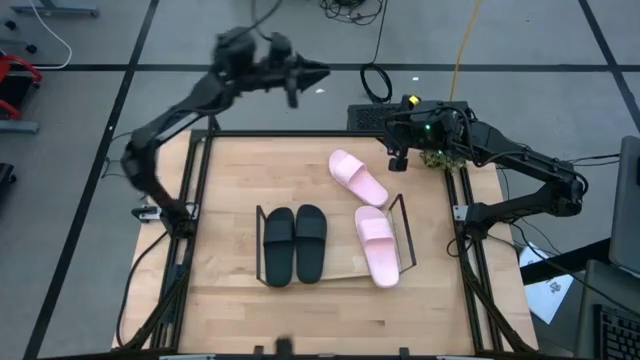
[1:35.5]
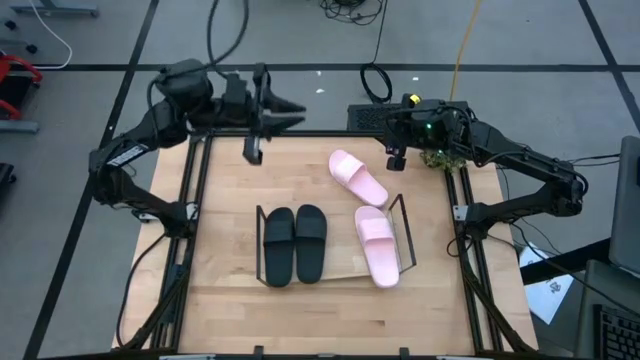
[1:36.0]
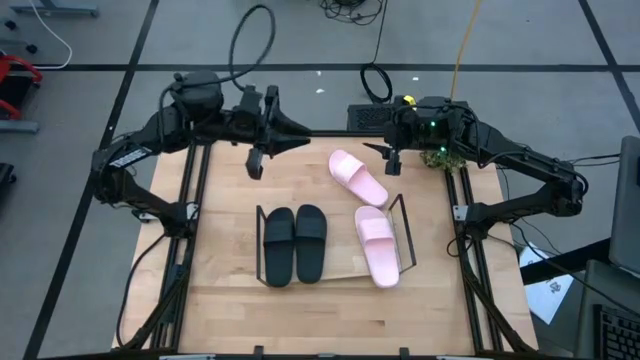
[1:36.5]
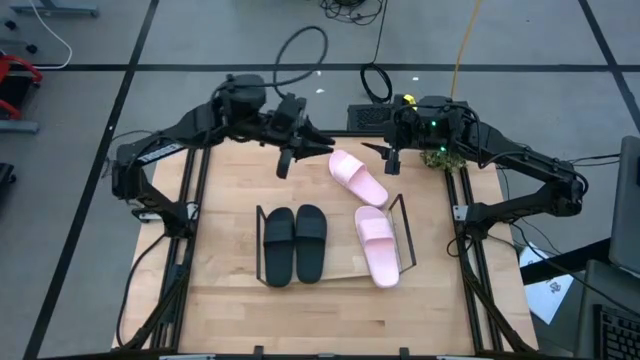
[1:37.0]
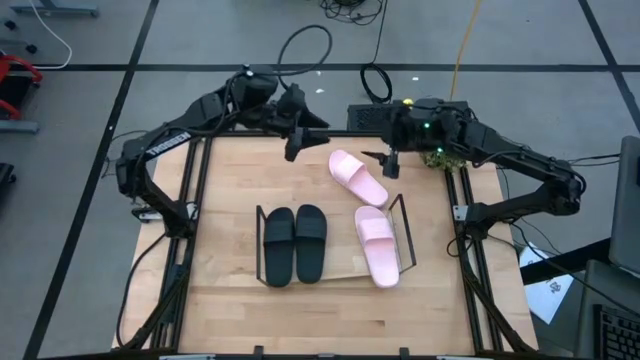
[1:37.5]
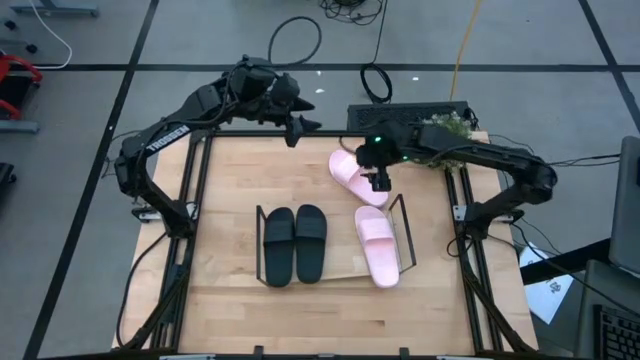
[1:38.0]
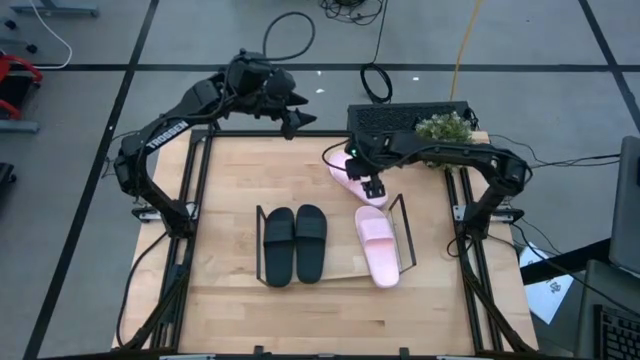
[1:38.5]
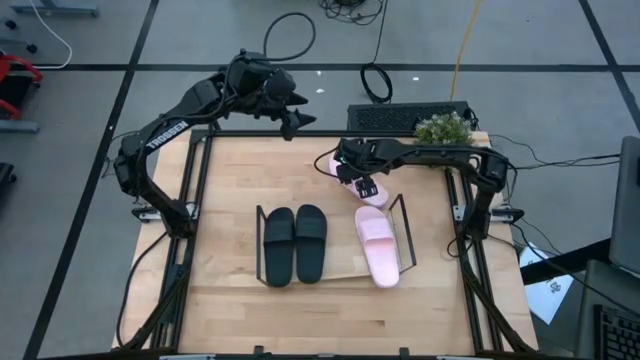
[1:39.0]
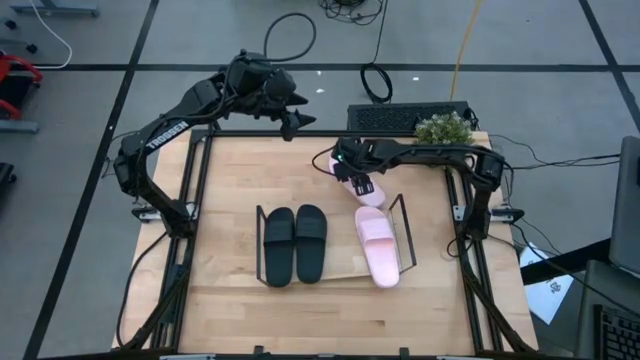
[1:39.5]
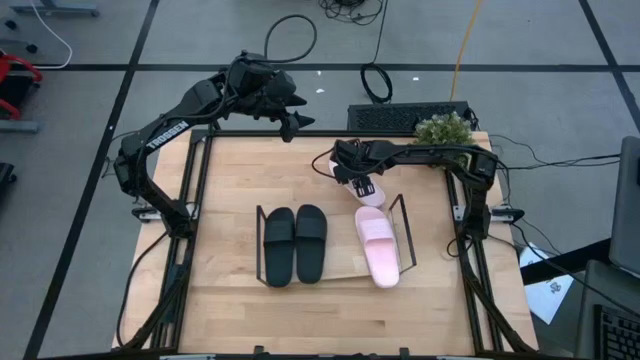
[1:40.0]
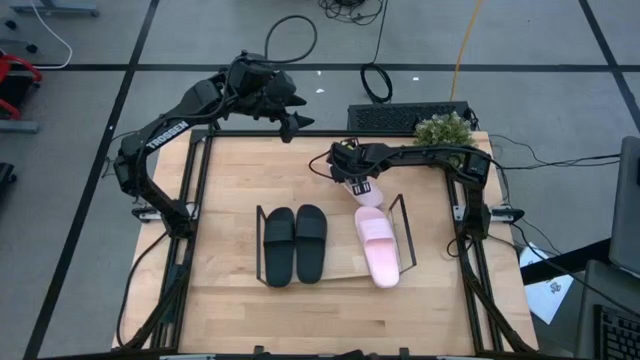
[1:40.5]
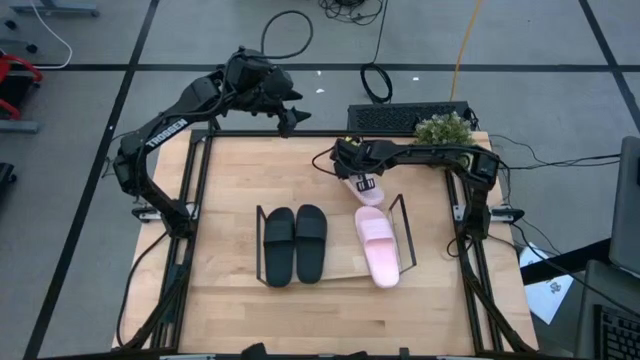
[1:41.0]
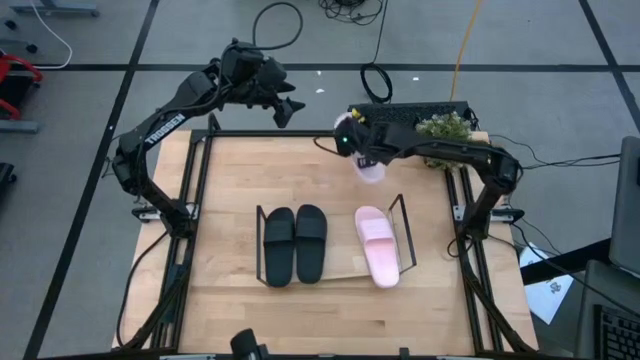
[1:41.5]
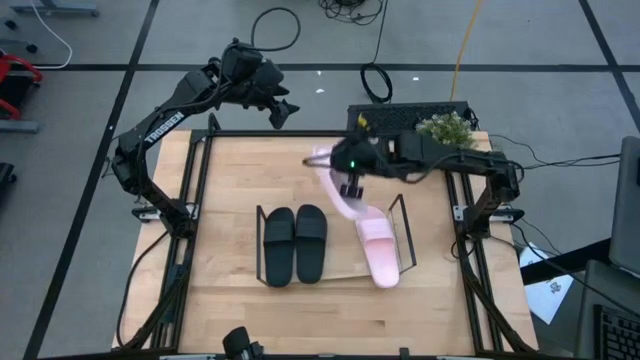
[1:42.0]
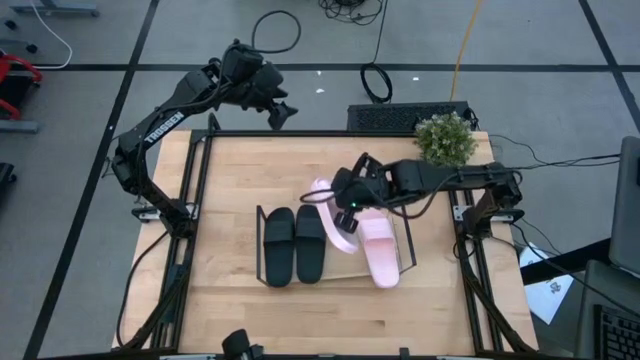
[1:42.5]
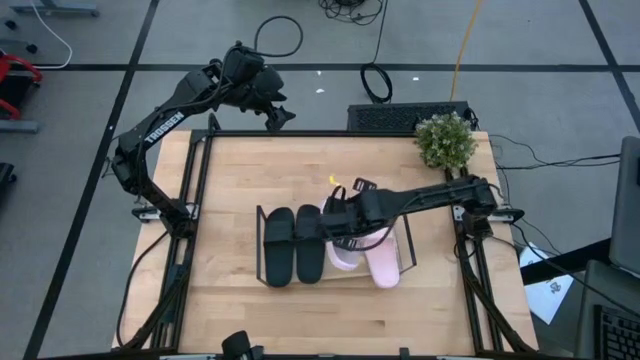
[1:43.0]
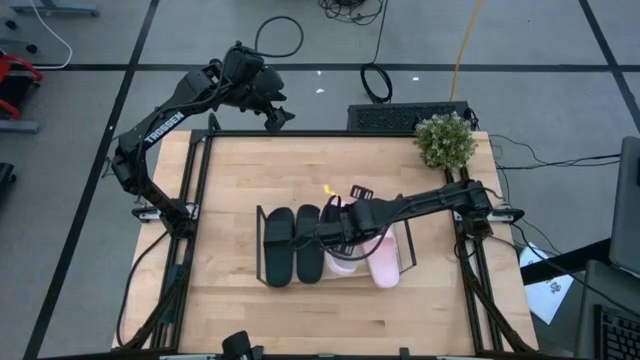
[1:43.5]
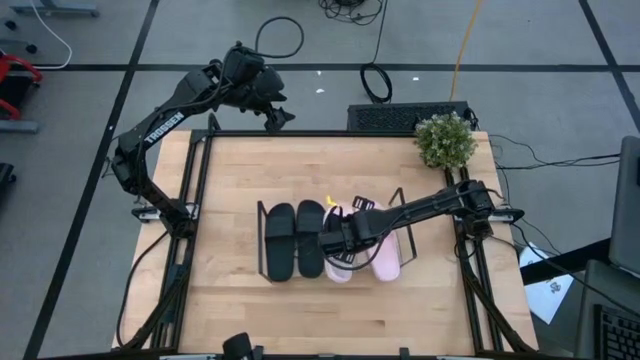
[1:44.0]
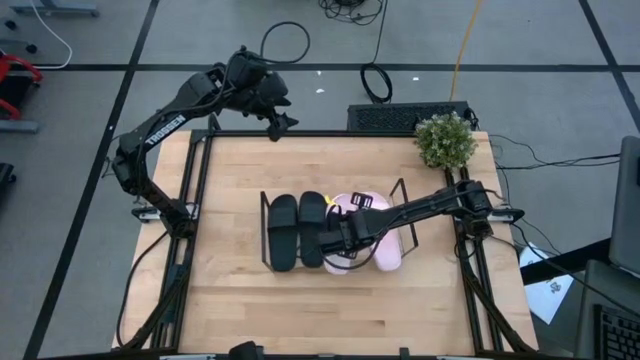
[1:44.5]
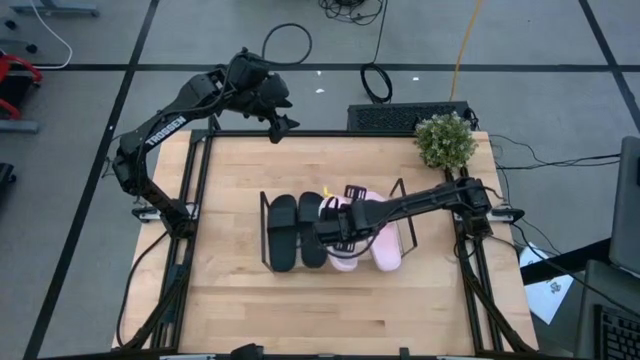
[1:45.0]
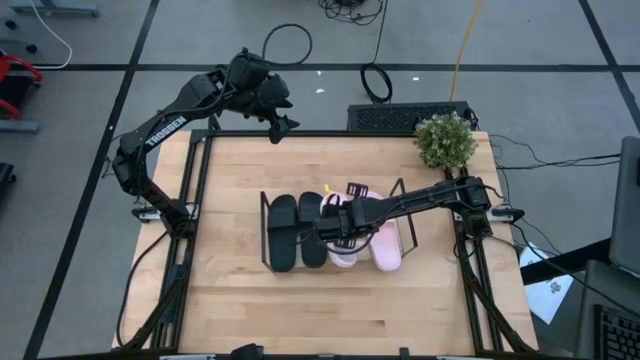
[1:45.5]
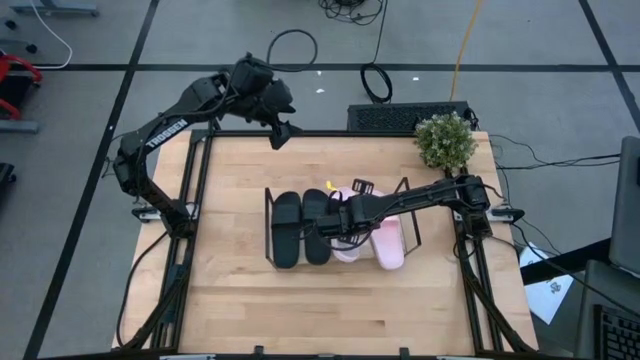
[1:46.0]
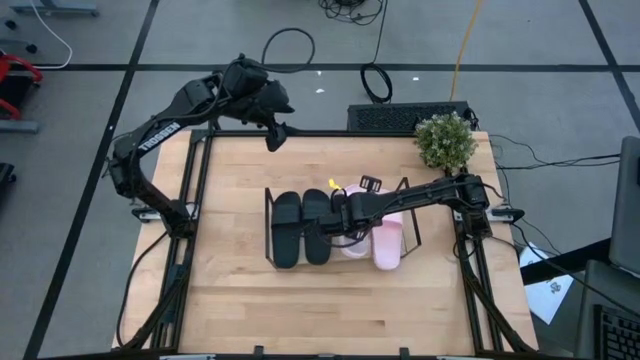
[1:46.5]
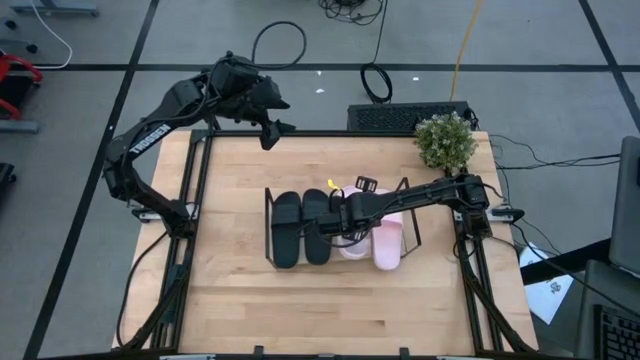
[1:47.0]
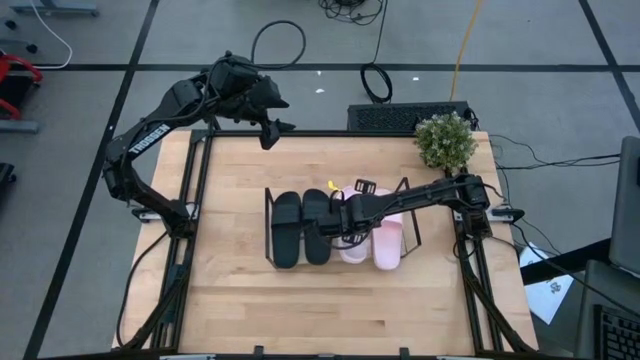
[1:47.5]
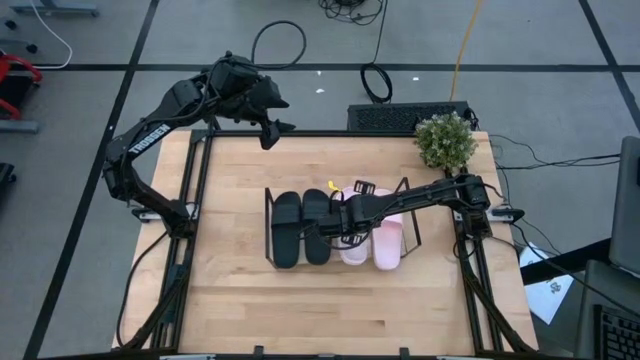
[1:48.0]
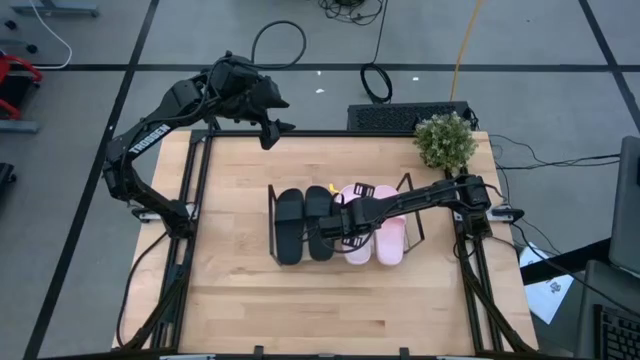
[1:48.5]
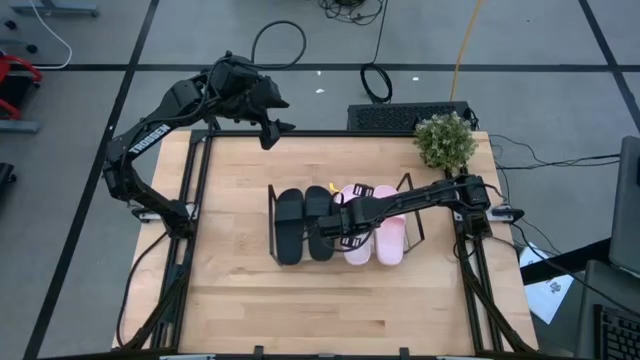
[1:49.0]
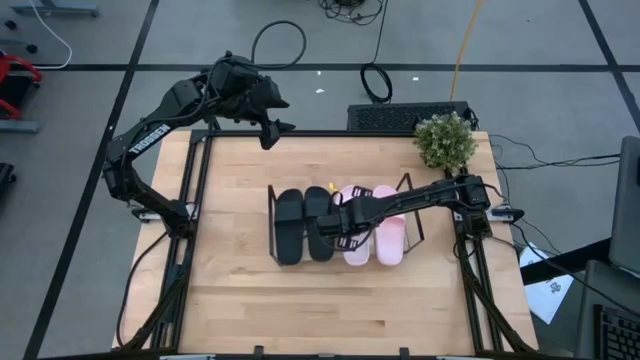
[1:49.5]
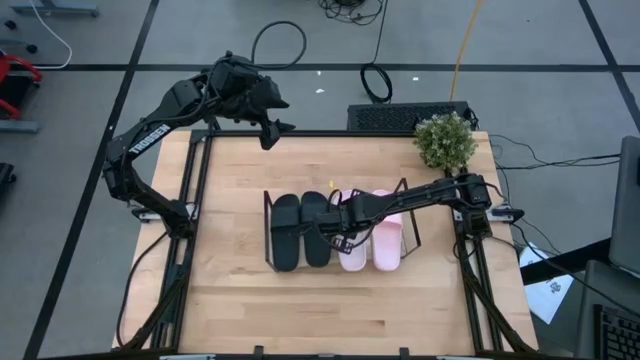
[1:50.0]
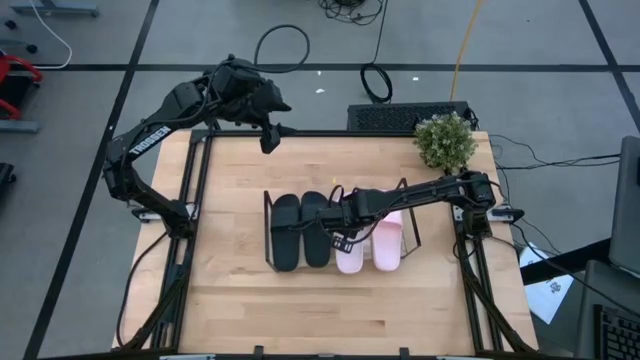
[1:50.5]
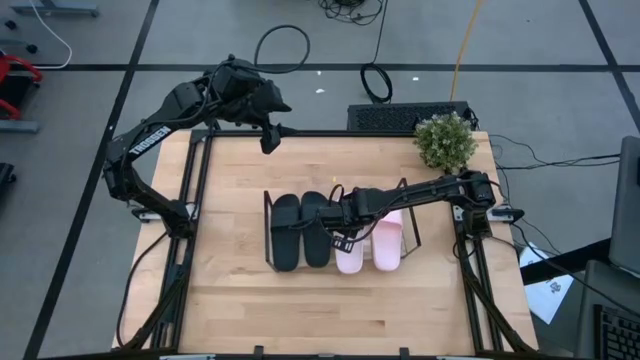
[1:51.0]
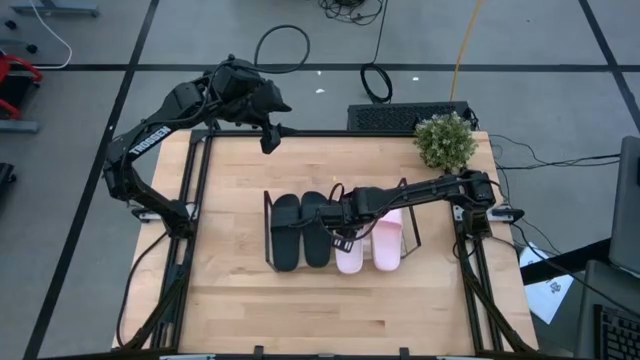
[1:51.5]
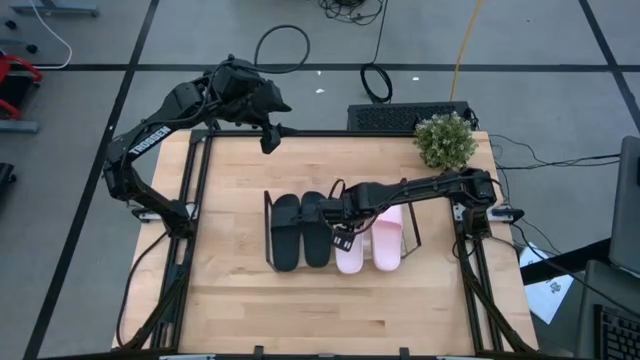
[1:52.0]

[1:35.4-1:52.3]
Task: Pick and place slides into the shelf
Put the pink slides on the shelf

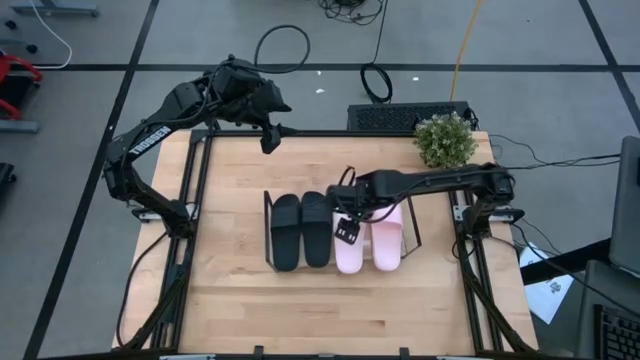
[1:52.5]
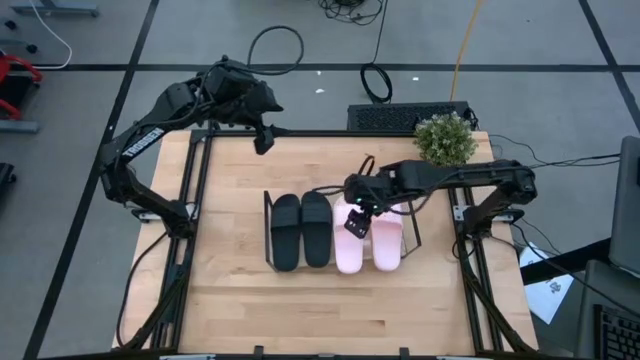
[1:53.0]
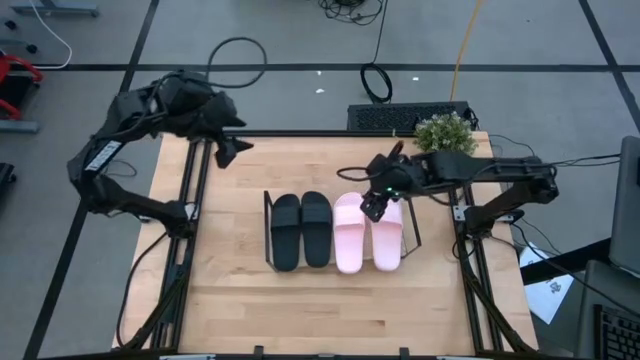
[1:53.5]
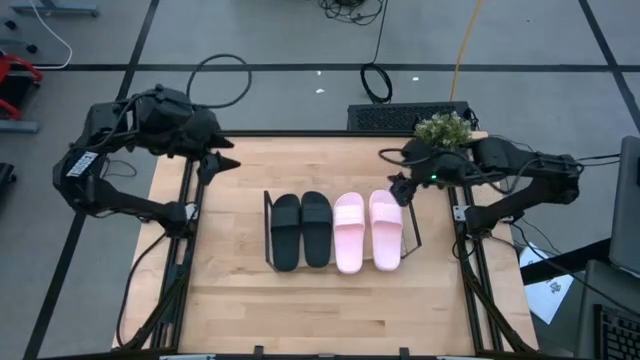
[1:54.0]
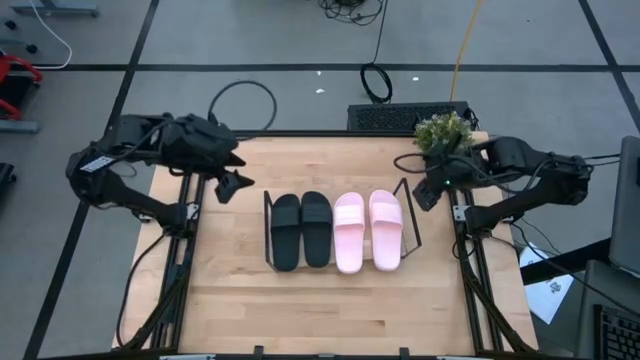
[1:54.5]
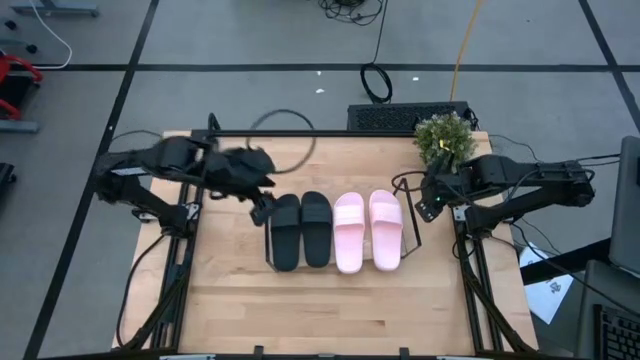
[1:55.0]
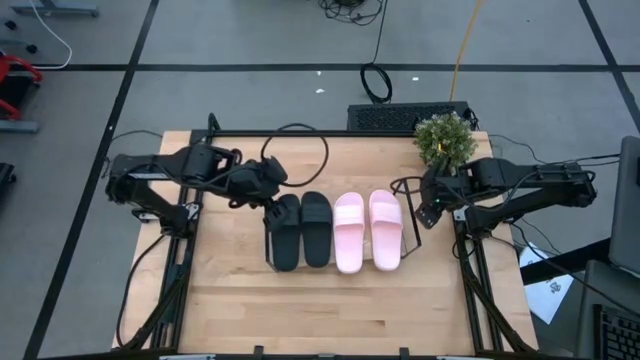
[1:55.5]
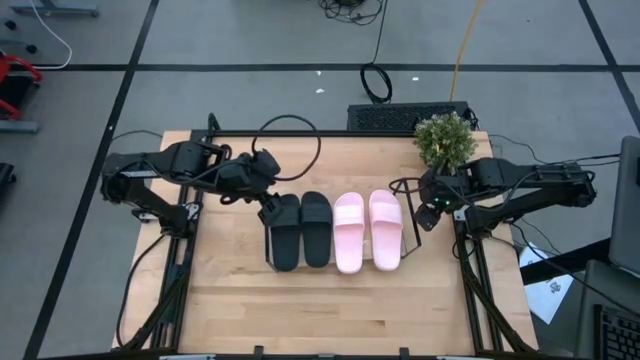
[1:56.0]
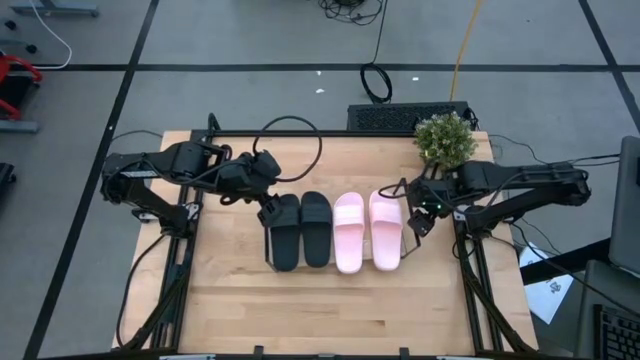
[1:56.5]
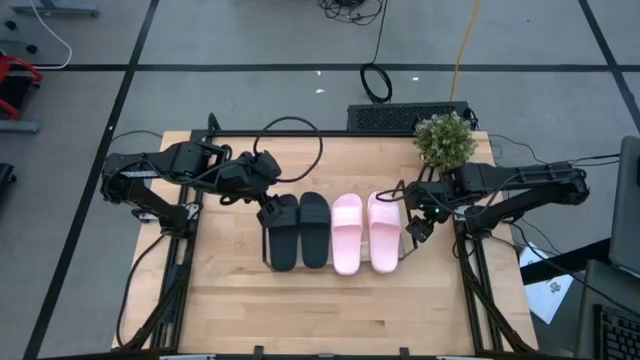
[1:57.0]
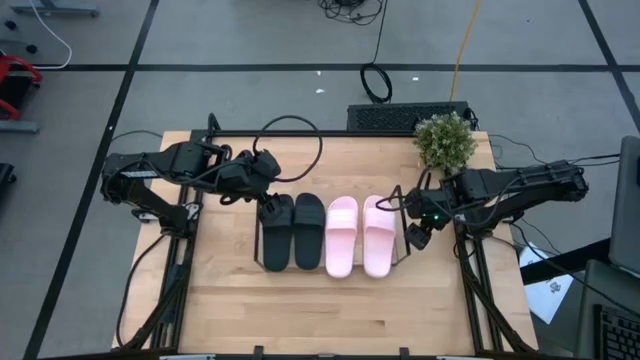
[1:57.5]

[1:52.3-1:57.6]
Adjust the shelf
